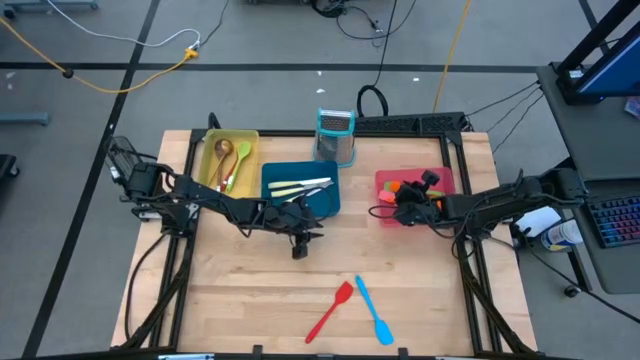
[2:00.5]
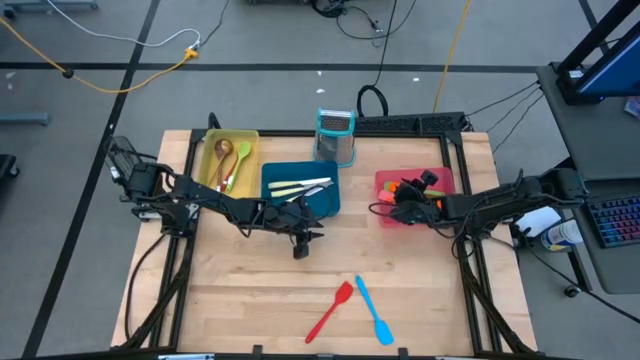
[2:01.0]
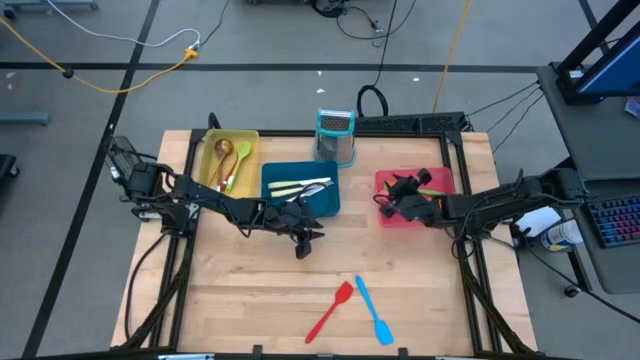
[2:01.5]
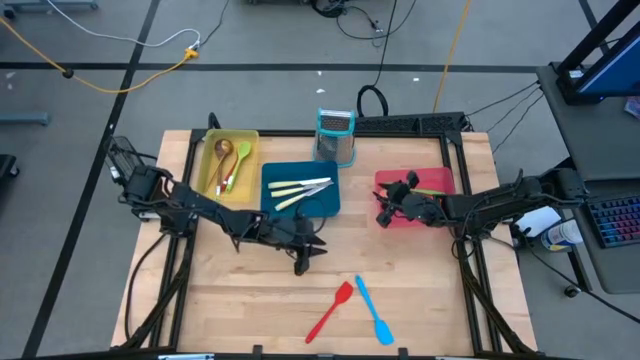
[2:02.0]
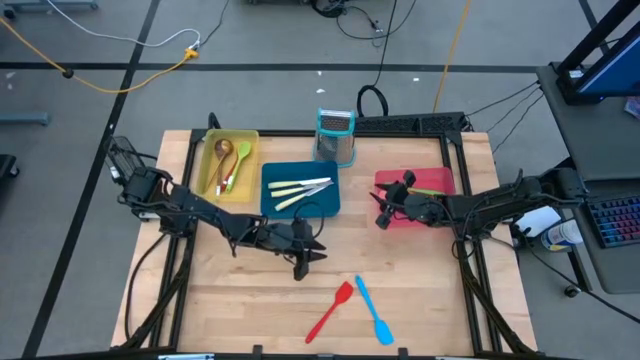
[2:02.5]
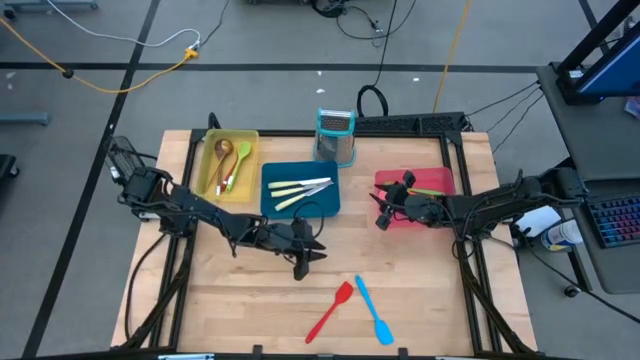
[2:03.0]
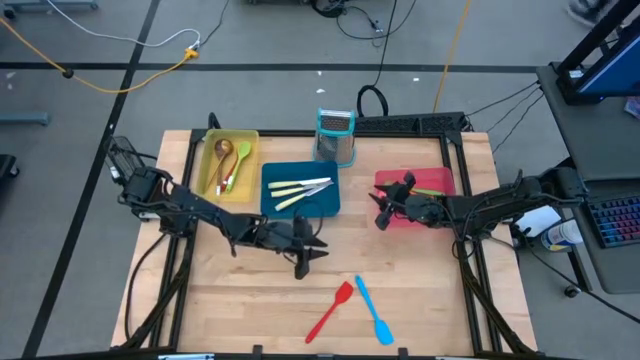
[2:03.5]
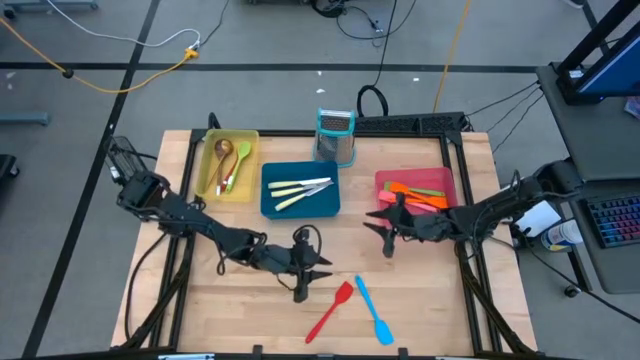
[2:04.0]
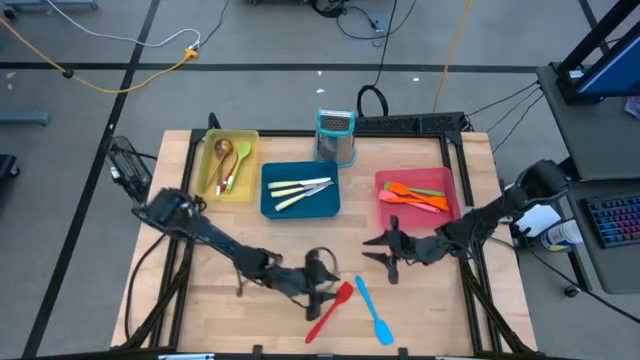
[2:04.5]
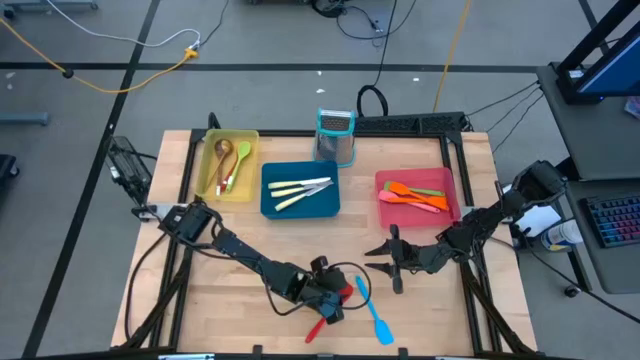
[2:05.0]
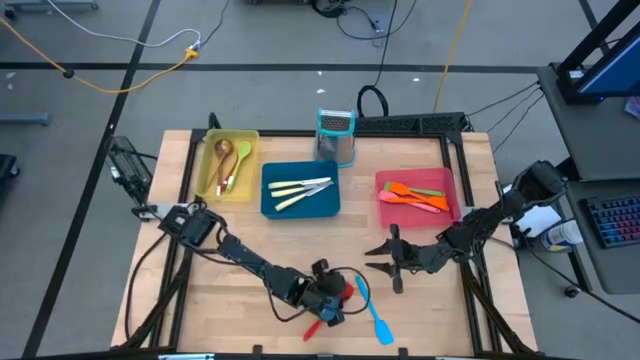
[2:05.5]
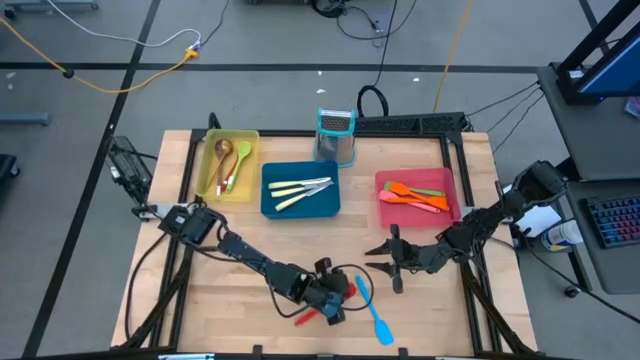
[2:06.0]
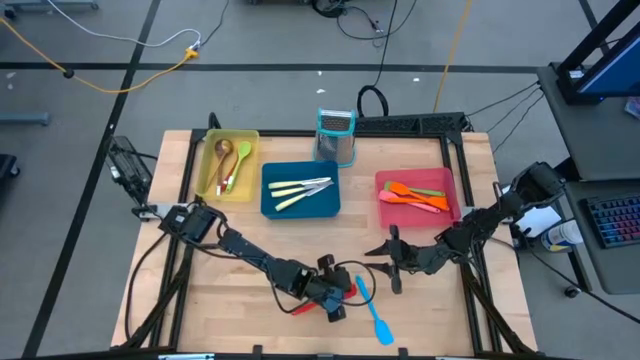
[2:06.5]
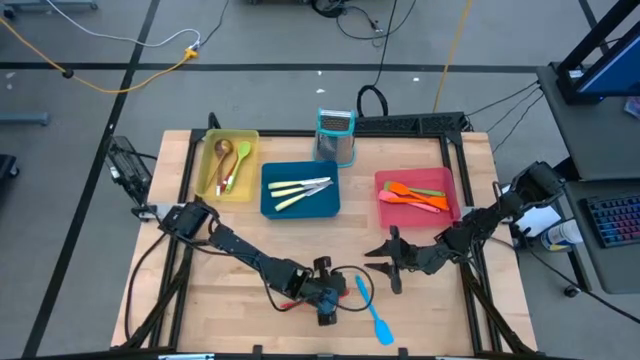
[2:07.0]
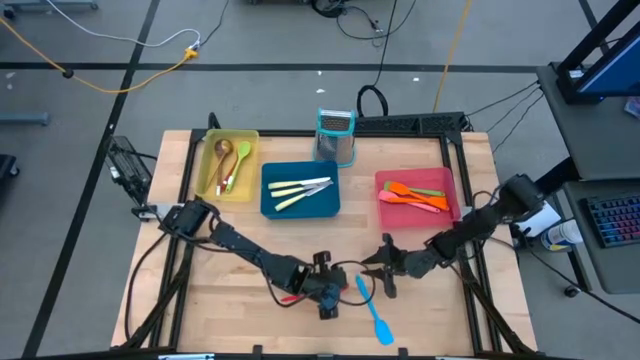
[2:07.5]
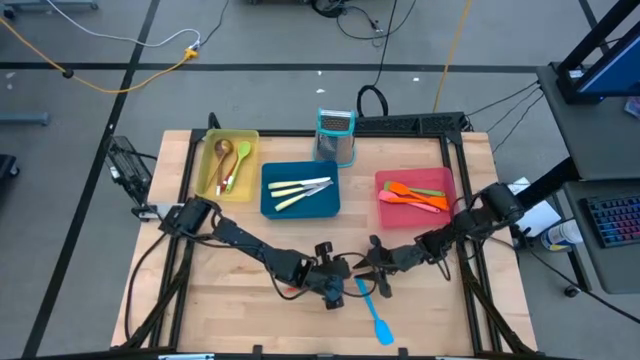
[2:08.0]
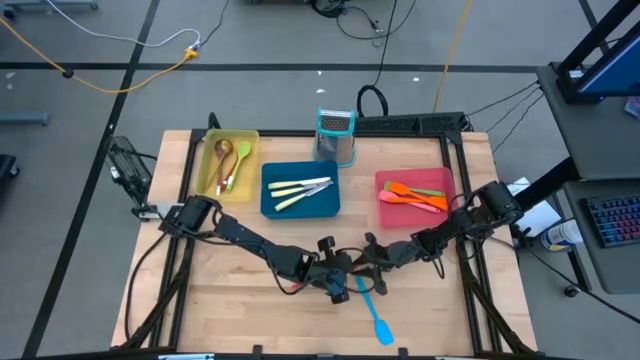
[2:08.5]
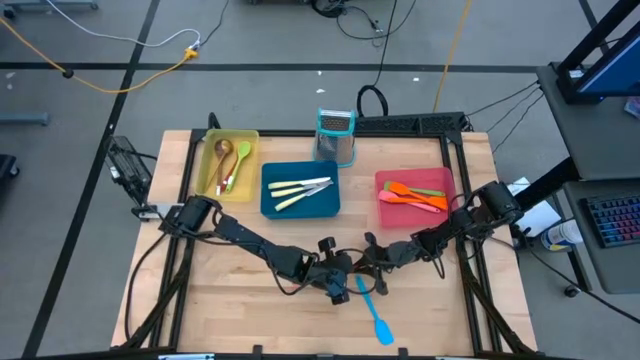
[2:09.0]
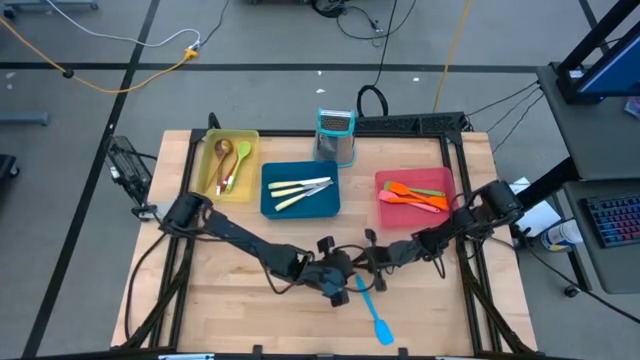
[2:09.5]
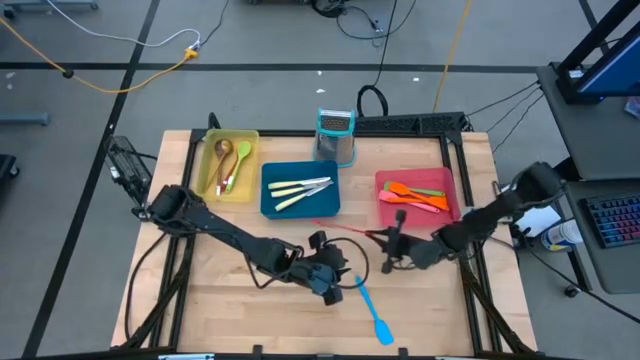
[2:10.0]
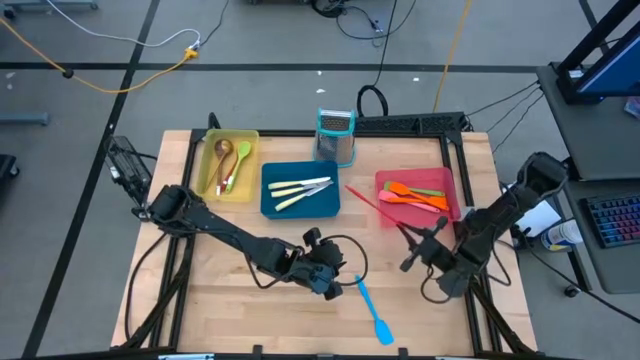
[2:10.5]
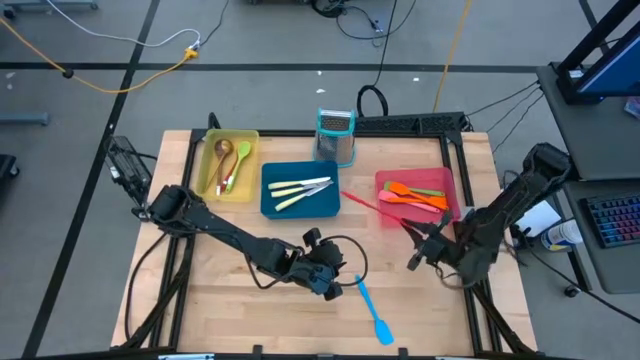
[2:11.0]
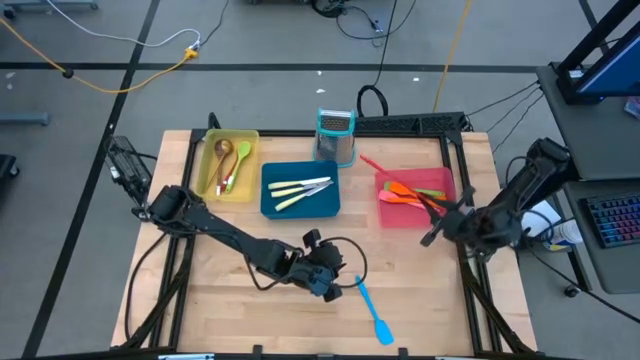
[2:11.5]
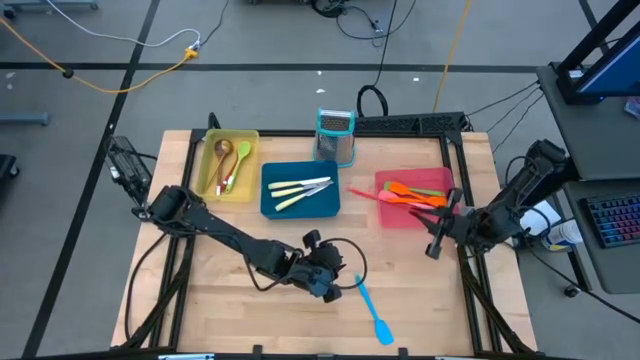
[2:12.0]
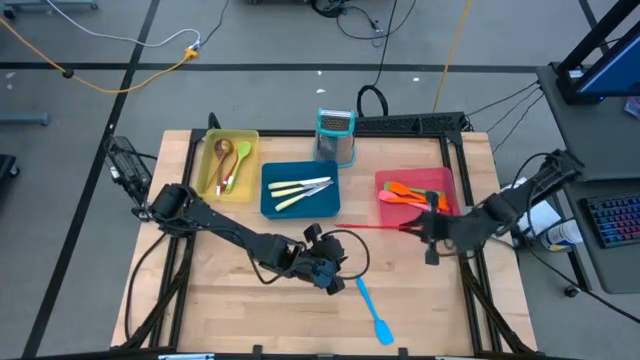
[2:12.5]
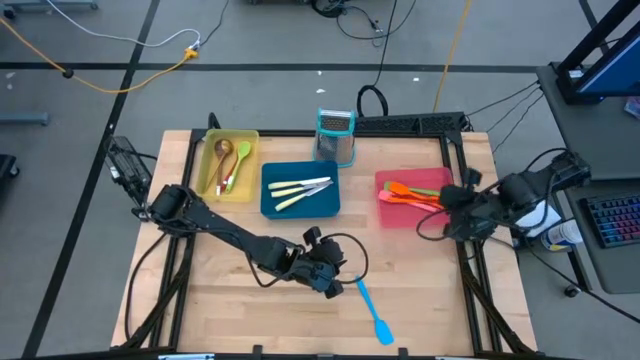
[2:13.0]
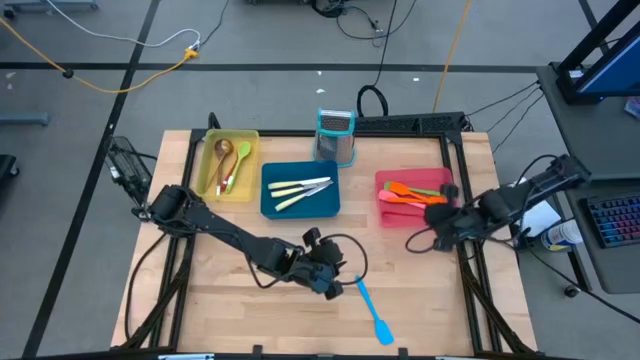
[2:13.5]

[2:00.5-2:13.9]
Task: Pick & Place Kitchen Items
Put the red spatula into the red bin

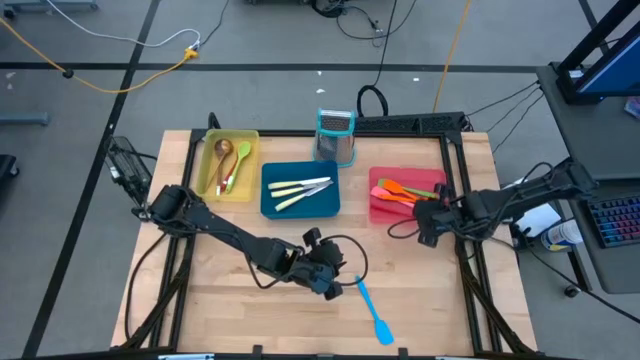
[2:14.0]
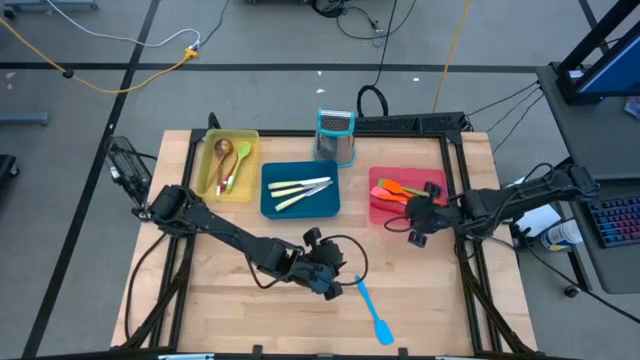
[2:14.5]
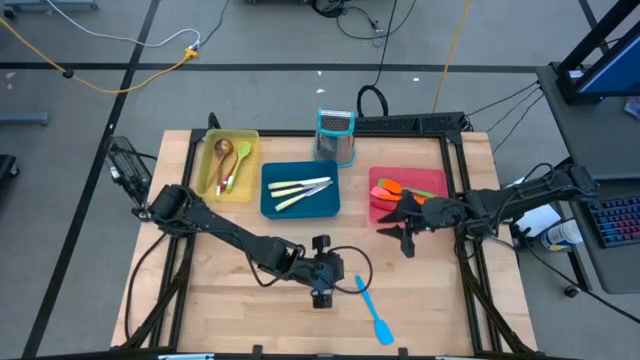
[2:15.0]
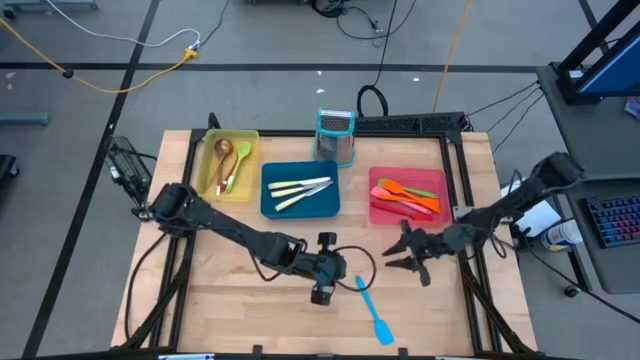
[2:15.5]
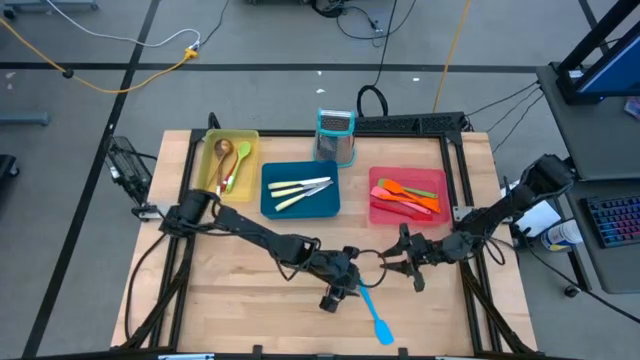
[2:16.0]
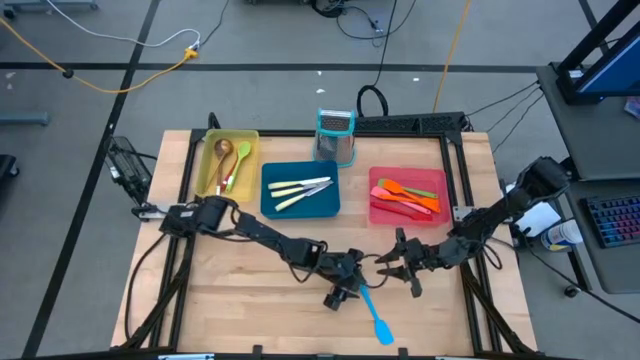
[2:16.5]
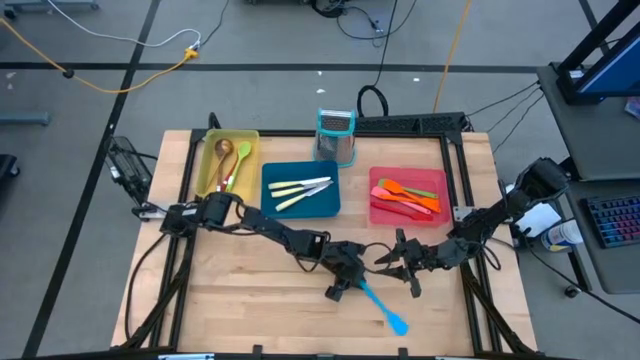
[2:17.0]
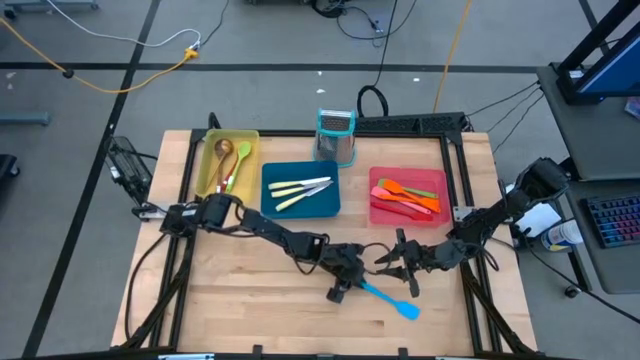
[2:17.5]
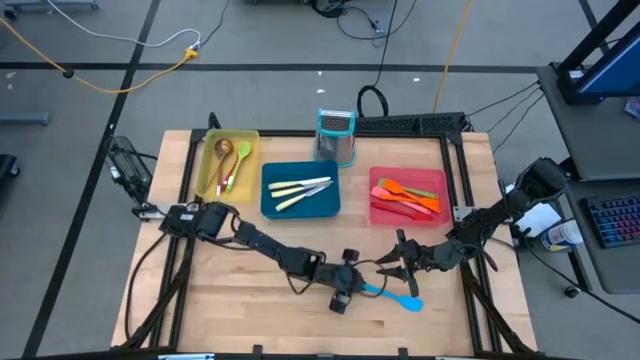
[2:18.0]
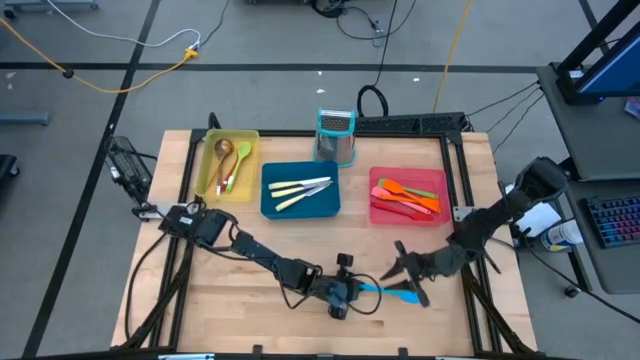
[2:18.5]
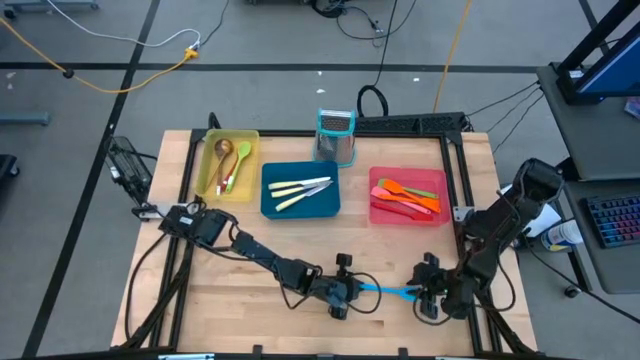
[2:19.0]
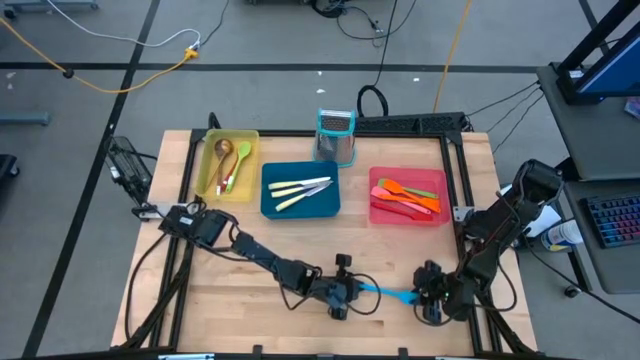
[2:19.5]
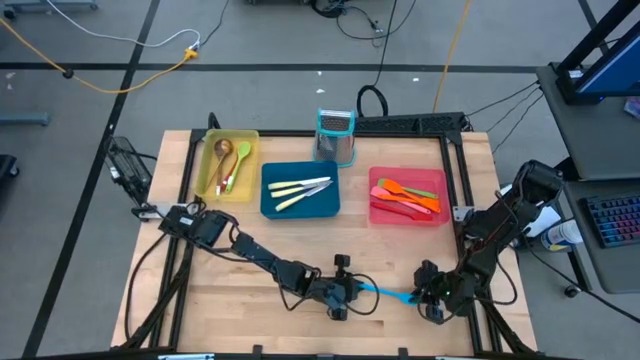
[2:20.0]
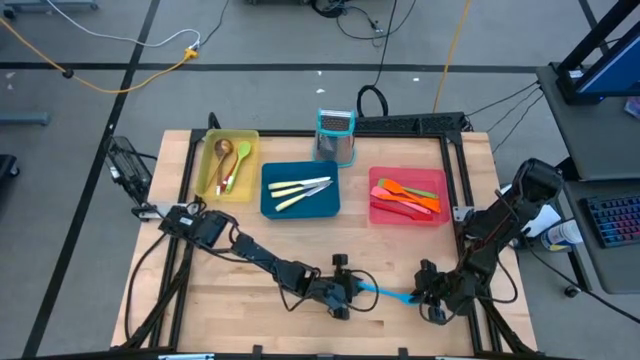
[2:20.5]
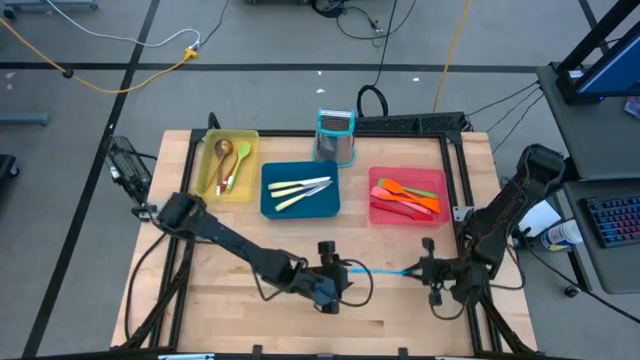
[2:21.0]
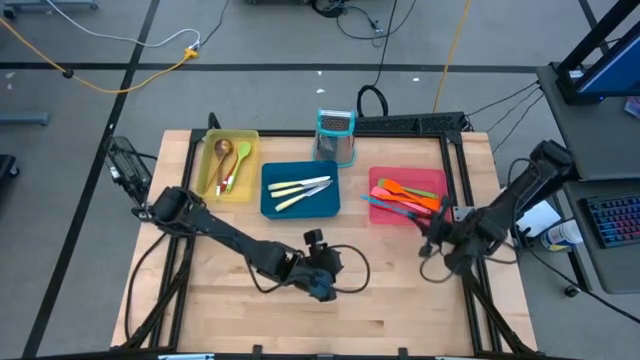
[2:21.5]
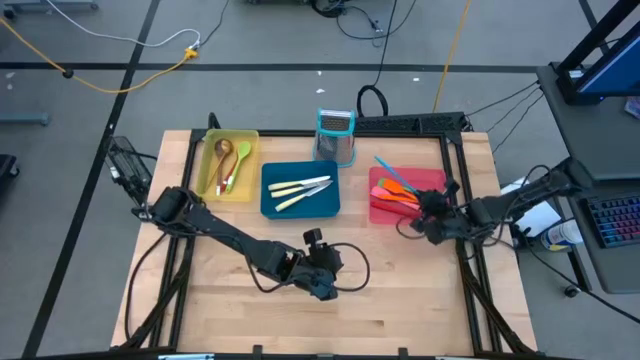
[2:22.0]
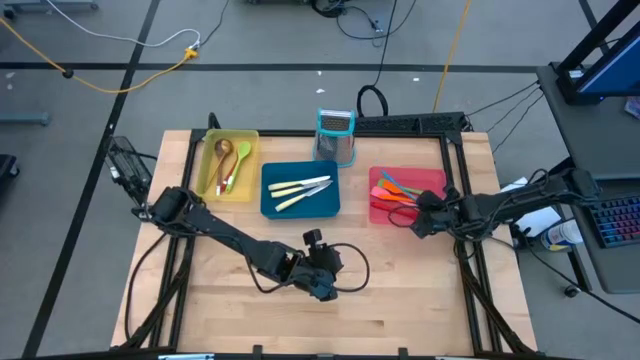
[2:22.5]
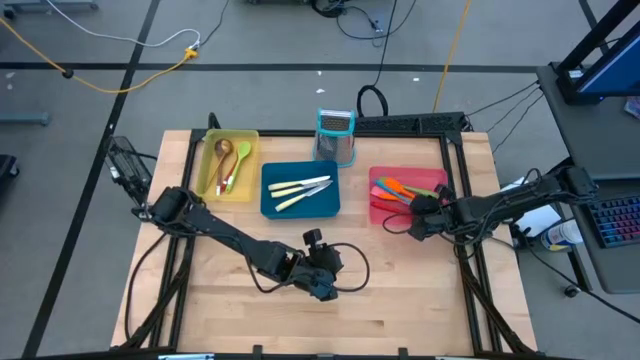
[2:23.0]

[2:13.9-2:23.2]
Put the blue spatula into the red bin
